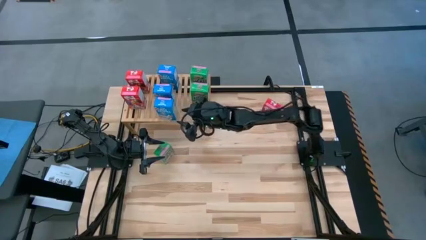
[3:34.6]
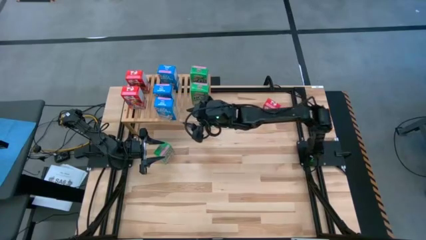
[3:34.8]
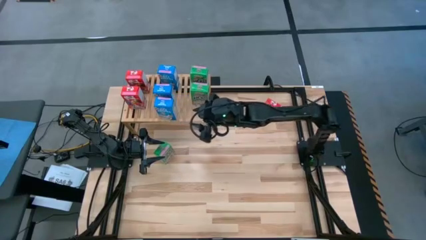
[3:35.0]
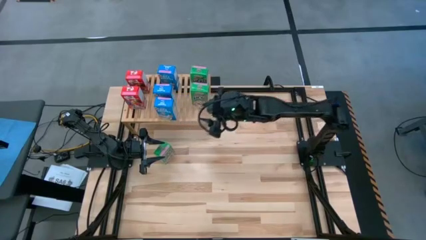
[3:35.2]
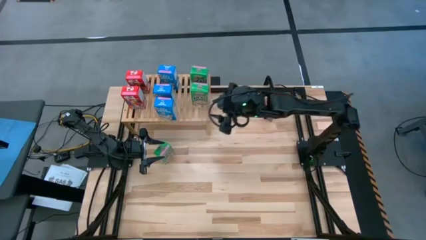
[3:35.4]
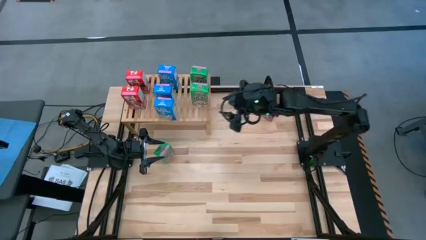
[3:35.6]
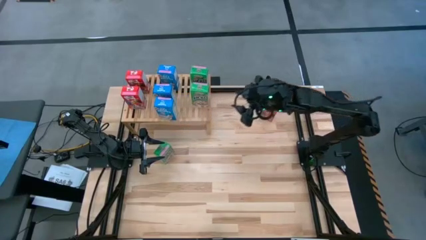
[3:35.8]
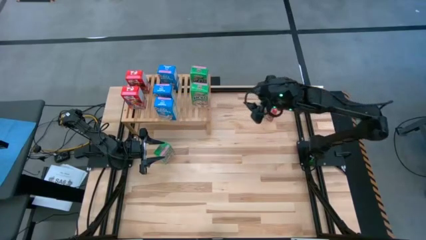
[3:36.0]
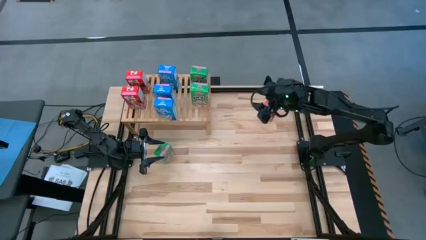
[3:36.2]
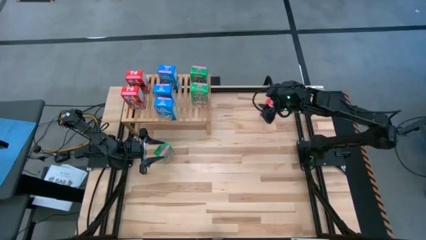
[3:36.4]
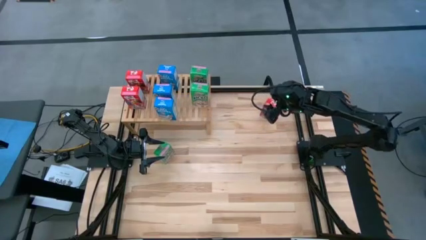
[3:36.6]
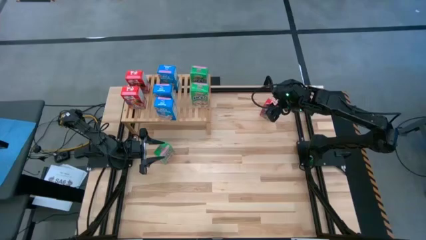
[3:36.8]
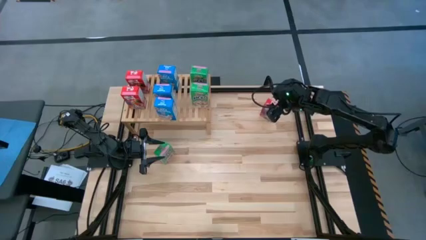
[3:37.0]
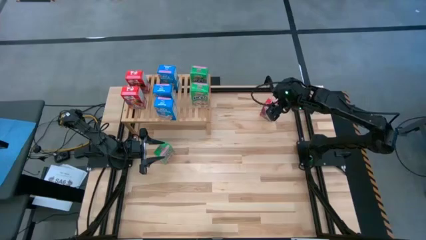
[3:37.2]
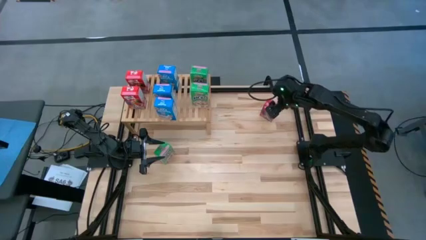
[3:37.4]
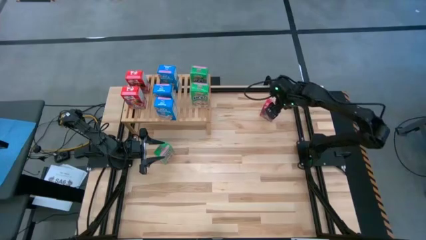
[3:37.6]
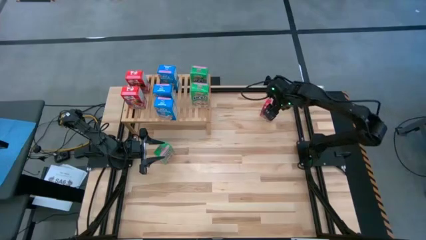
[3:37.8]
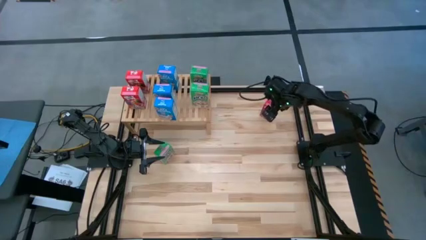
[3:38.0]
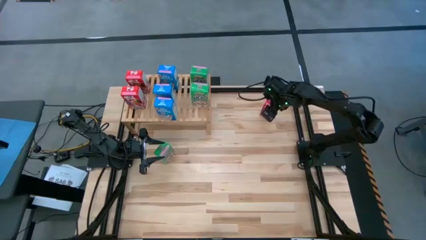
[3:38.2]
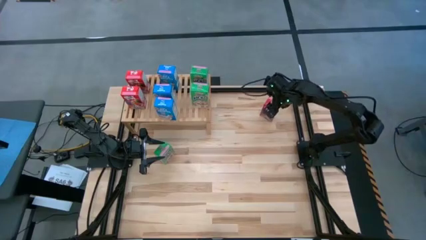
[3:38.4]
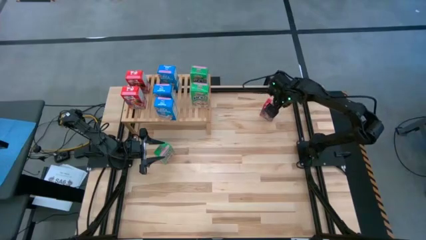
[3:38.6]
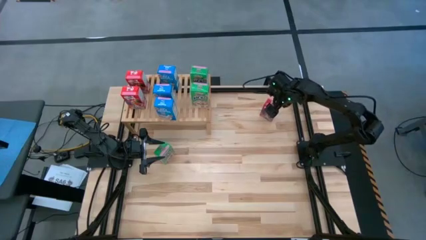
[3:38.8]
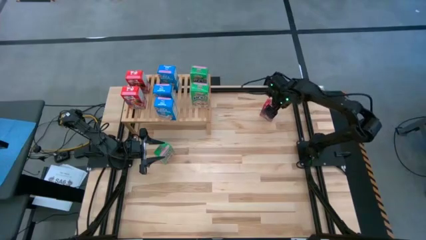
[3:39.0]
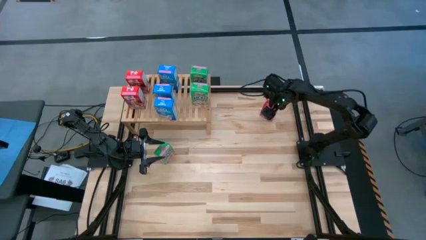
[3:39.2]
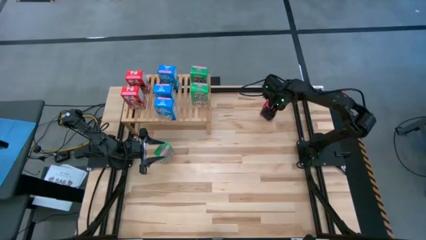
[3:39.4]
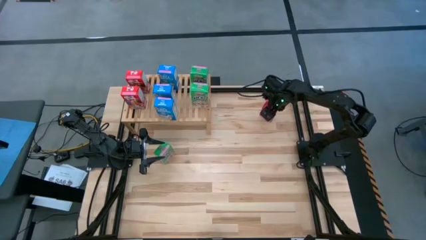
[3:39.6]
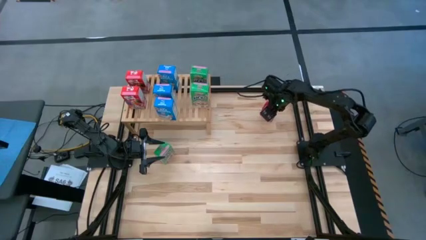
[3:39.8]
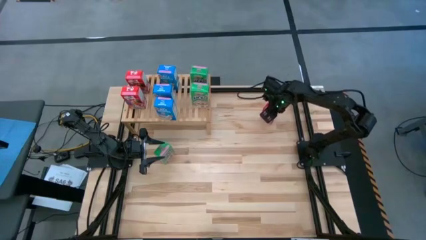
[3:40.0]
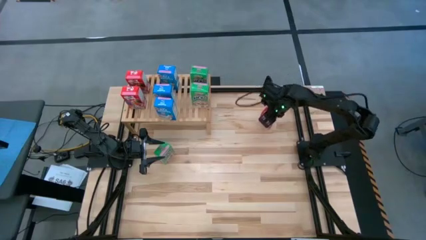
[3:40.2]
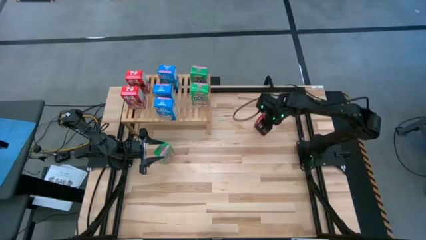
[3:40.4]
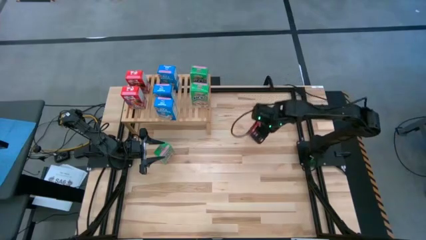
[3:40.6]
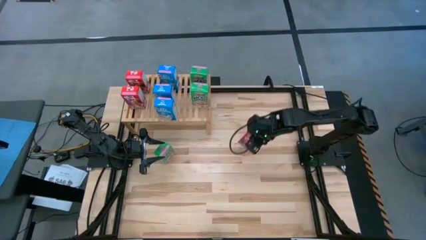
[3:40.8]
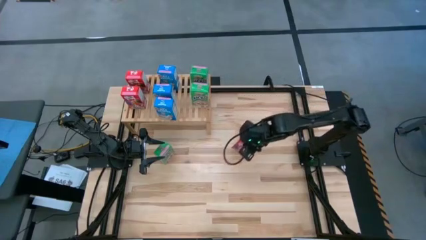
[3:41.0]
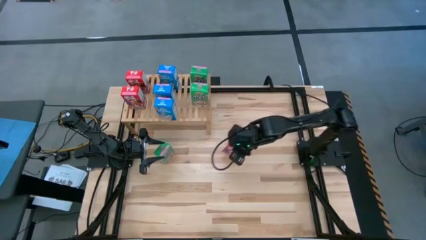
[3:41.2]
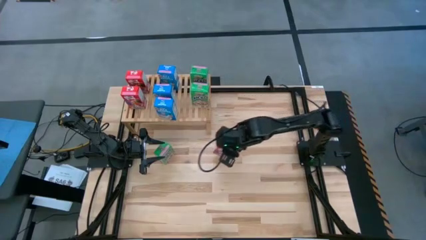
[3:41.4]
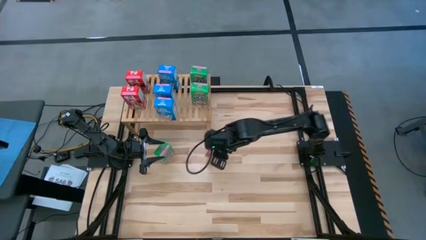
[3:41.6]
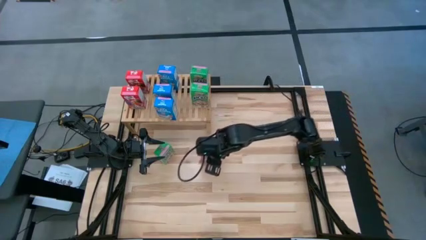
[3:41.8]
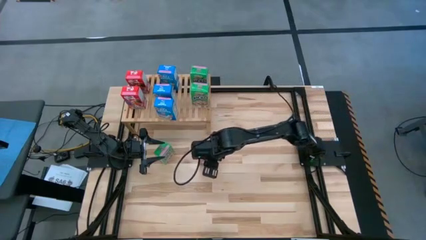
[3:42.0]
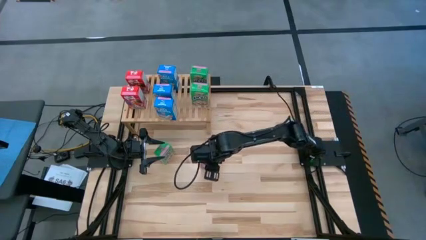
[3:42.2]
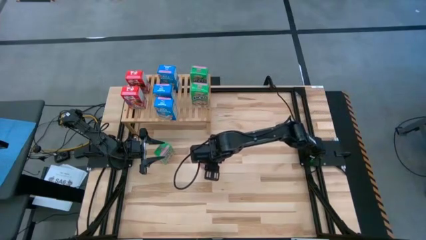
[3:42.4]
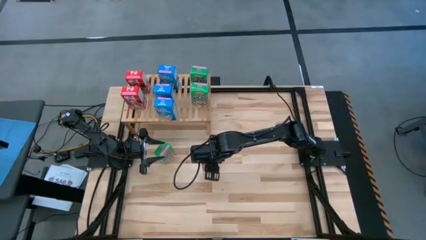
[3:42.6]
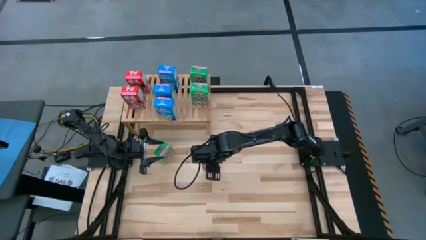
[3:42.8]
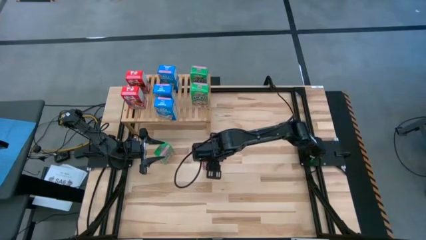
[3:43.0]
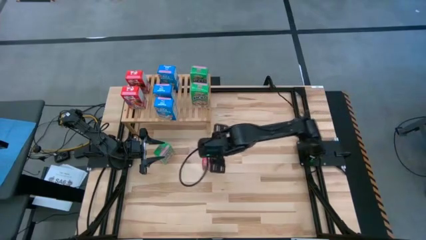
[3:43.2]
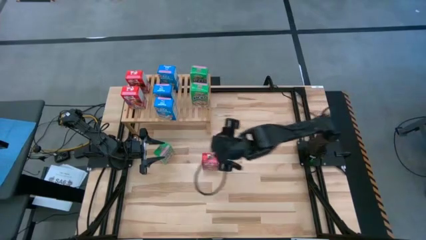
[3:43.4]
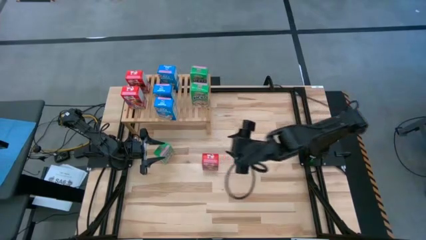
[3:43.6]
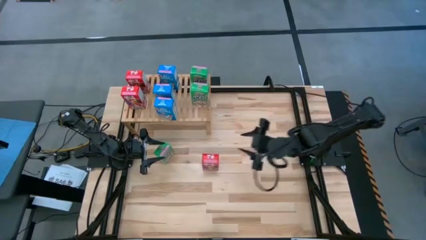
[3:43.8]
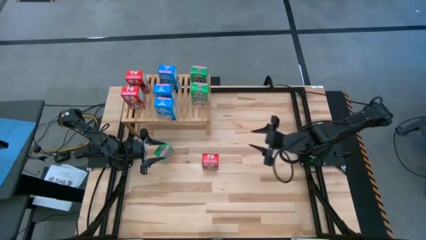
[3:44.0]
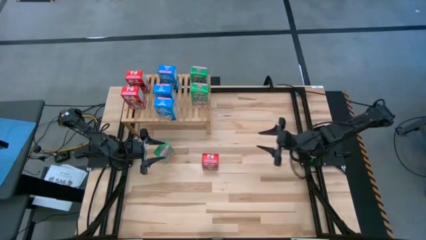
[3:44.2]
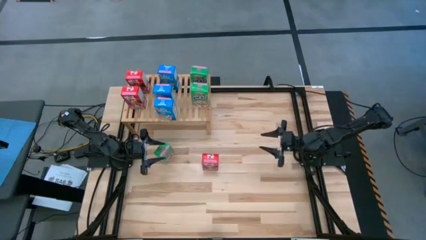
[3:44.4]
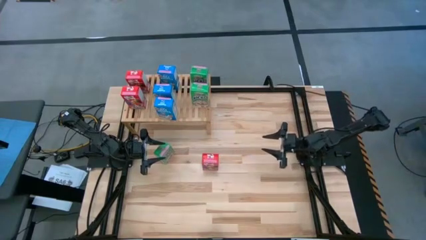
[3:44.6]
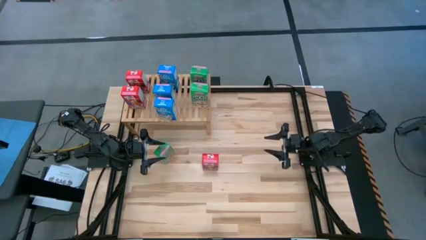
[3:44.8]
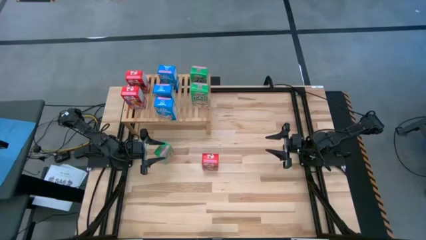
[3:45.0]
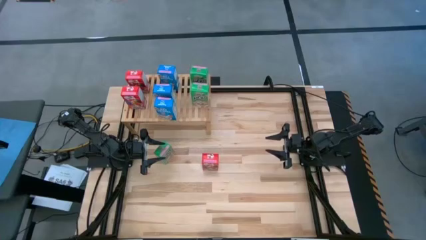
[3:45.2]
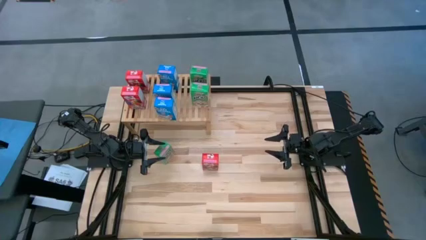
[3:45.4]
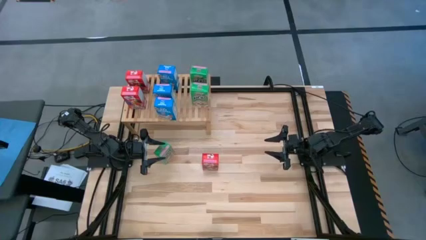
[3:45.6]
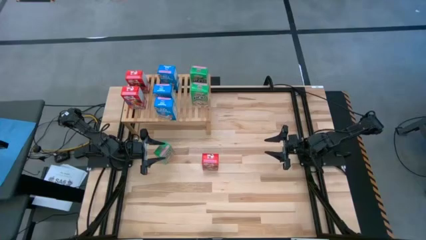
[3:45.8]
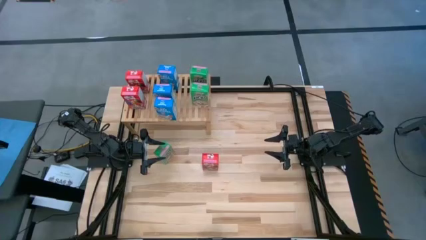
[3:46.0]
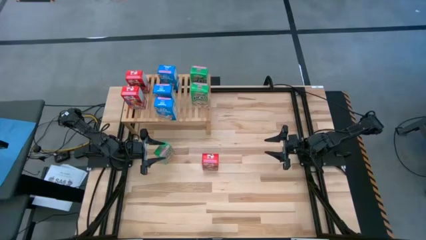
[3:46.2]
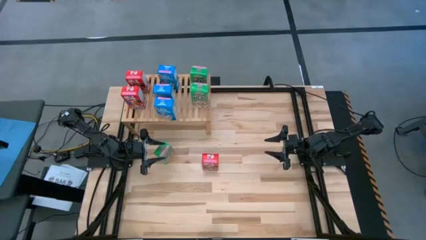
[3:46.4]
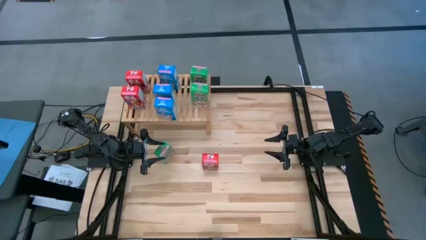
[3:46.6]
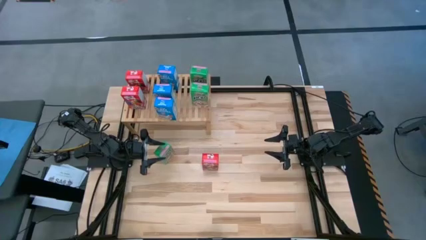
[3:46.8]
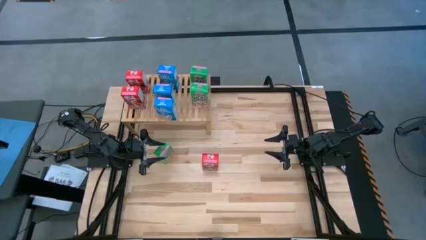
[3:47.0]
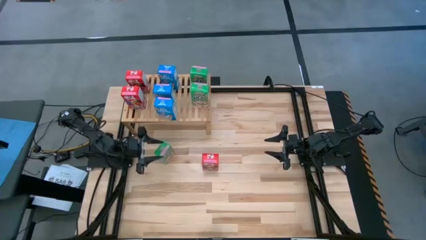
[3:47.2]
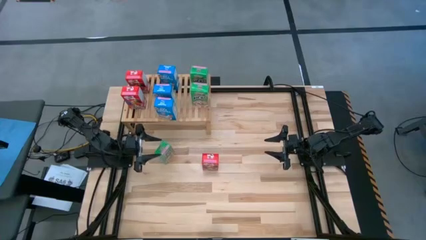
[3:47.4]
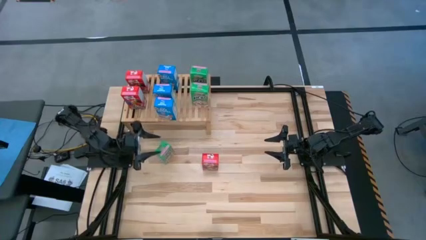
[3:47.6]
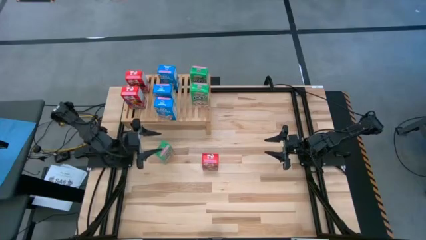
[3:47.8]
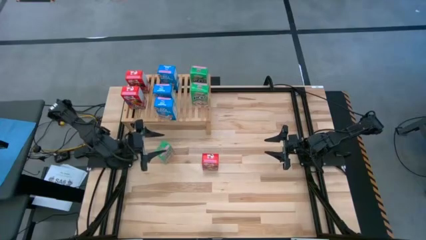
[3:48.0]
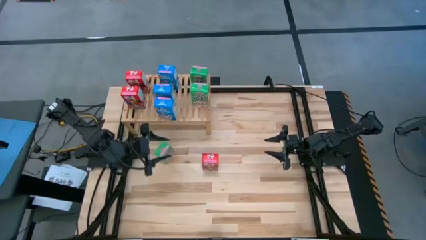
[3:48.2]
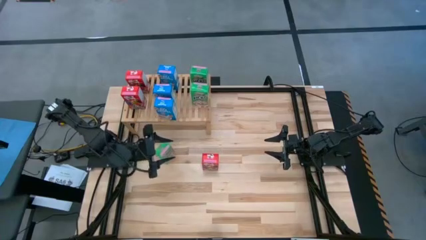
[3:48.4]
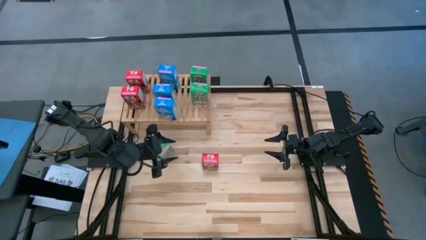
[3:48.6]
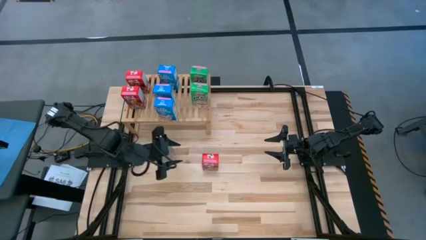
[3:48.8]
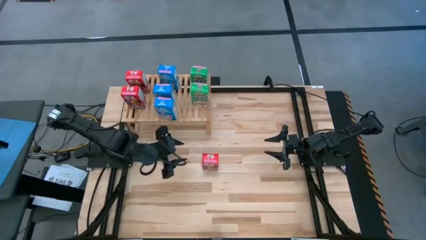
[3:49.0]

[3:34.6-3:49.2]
Task: Stack cereal on shelf
Put the red cereal box on the shelf aligned with the red cereal boxes

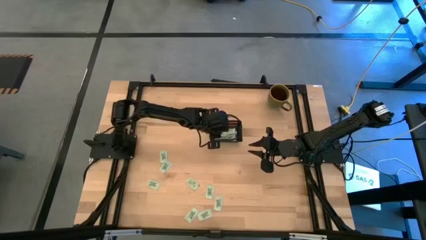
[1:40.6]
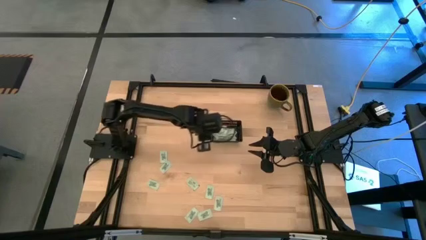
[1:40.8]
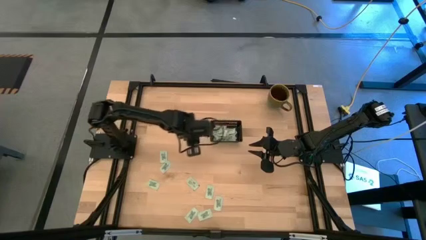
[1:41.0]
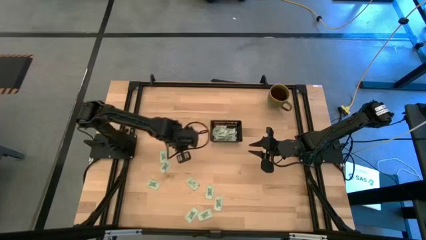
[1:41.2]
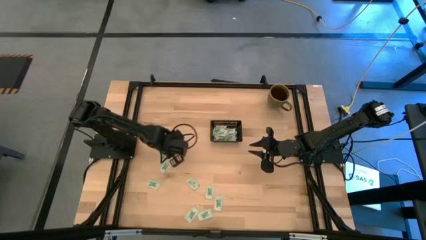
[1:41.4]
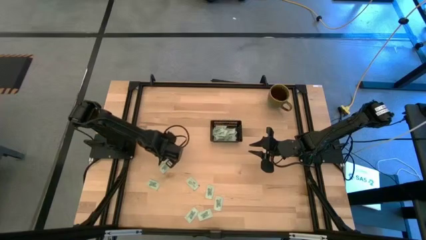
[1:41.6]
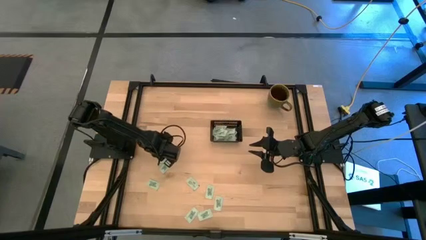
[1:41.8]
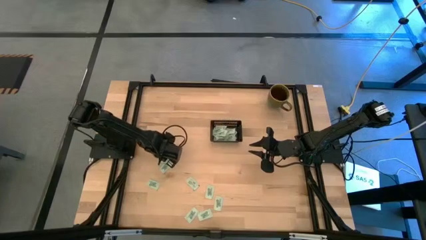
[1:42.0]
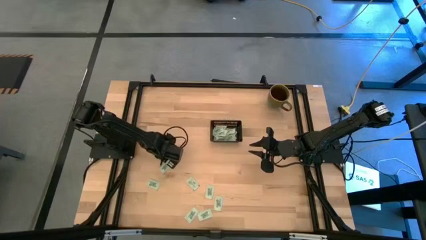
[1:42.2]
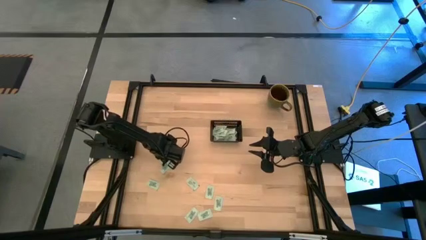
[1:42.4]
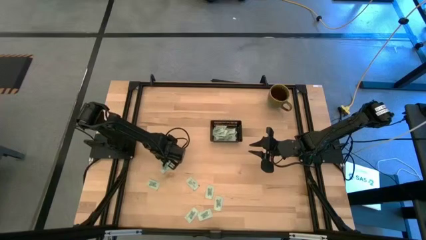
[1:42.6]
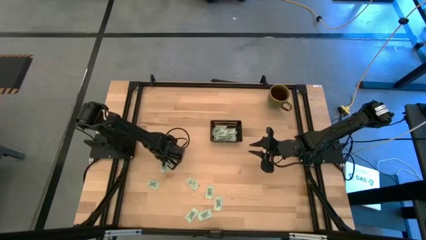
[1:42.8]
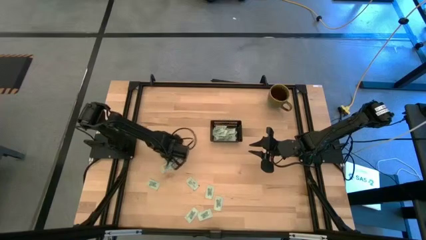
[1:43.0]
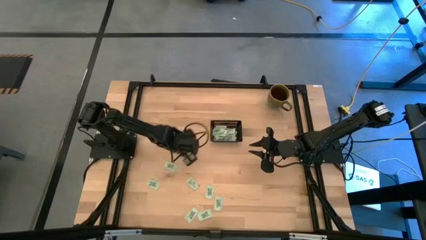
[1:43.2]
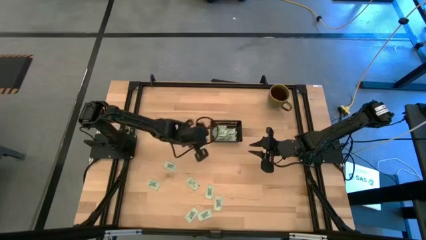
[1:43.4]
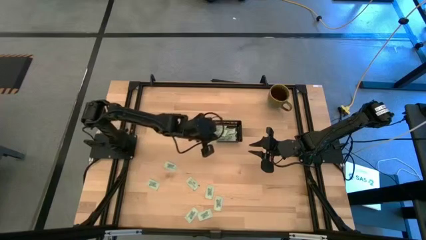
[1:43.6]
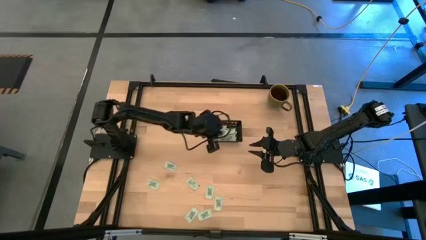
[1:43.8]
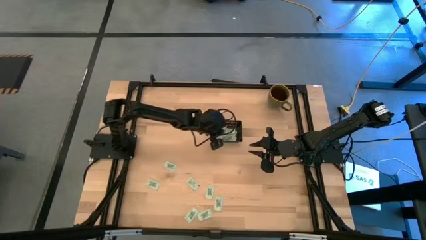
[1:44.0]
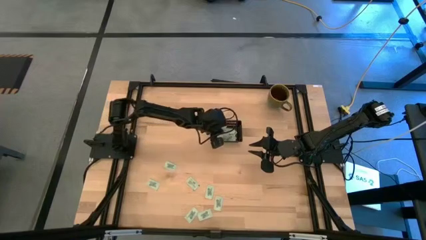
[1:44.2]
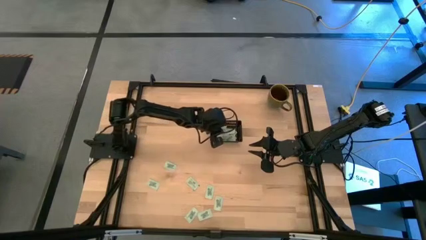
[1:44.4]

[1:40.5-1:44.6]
Task: Pick and place Stevia / Truvia into bins
Put the stevia packet into the black basket
